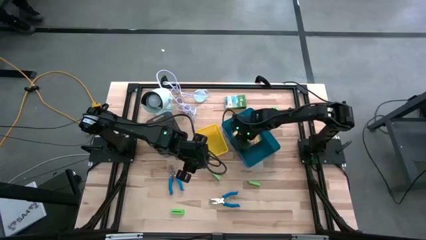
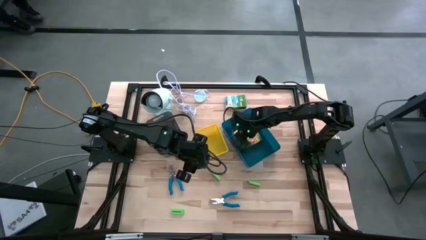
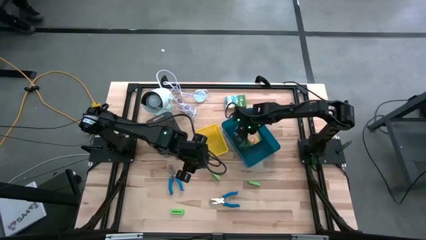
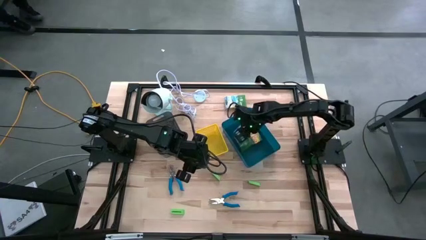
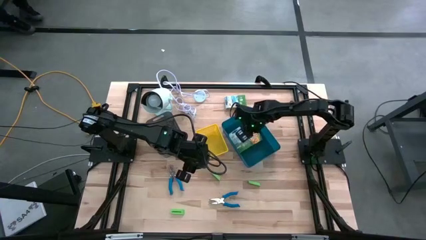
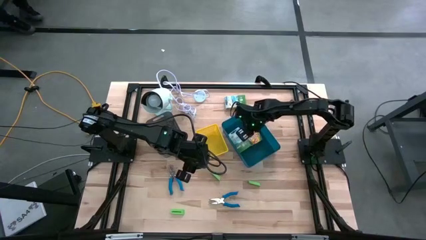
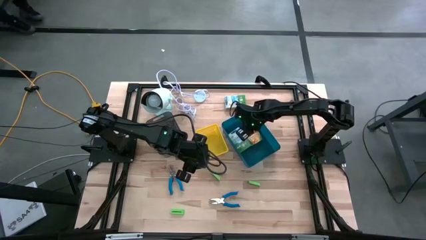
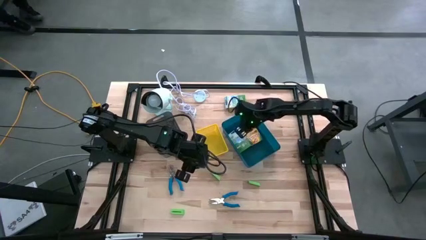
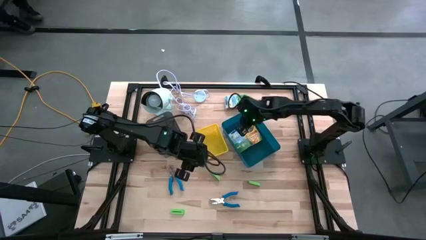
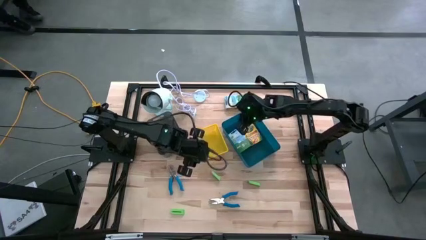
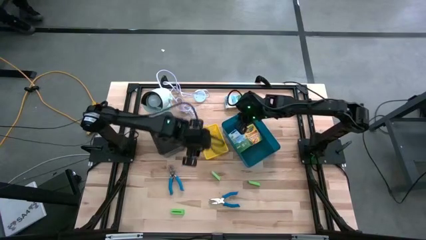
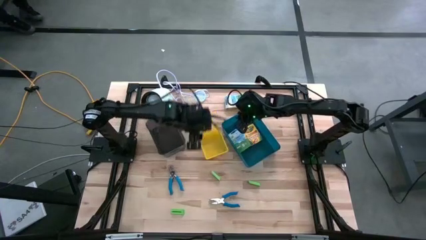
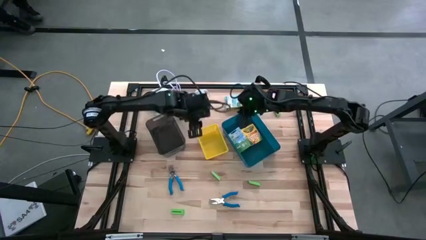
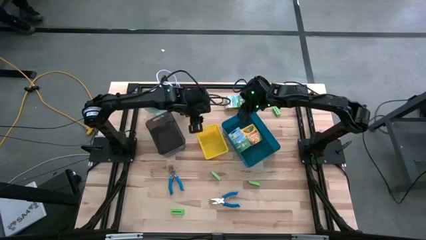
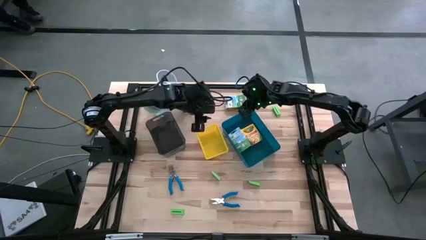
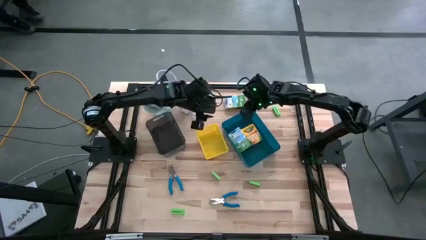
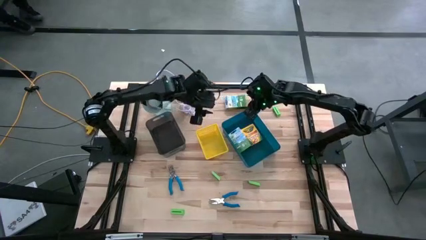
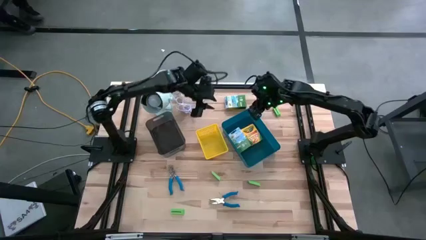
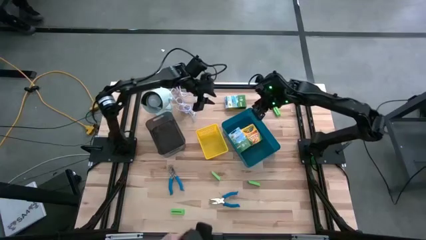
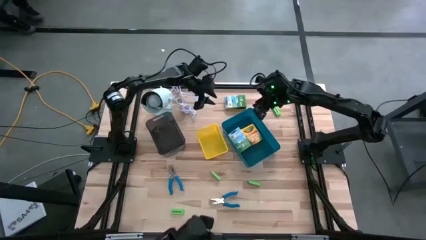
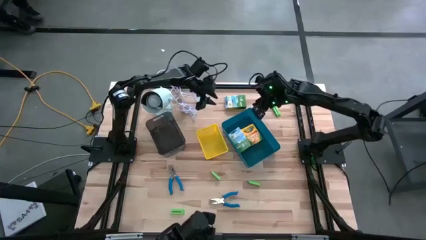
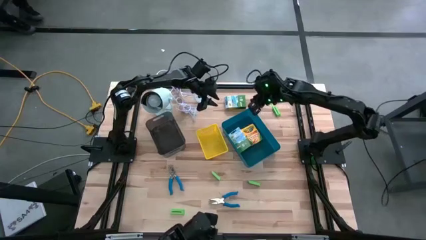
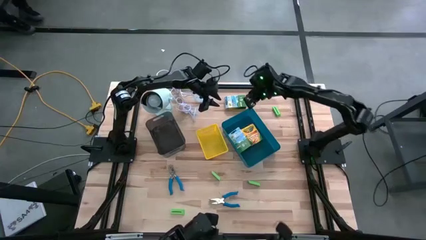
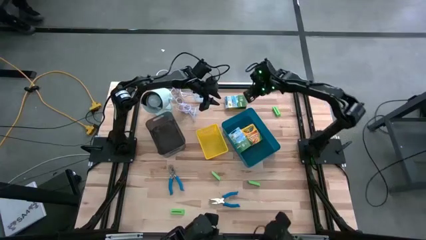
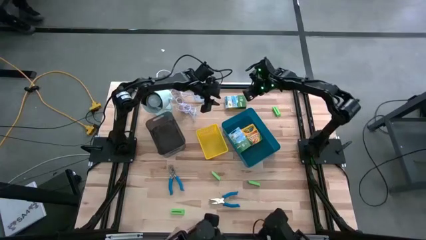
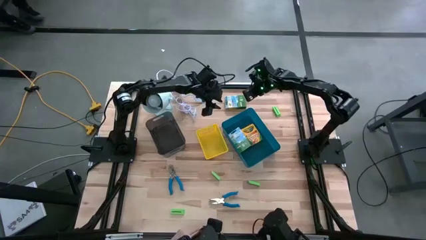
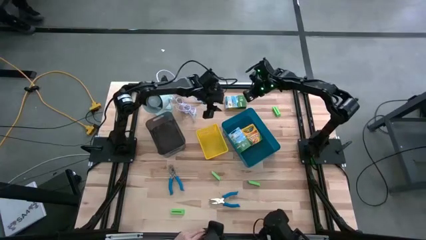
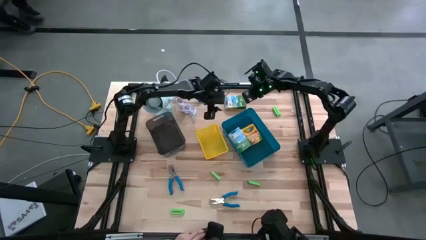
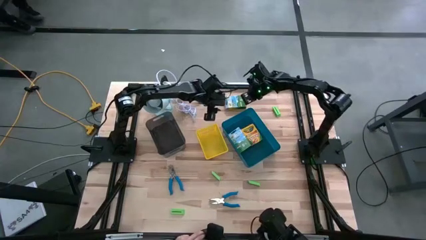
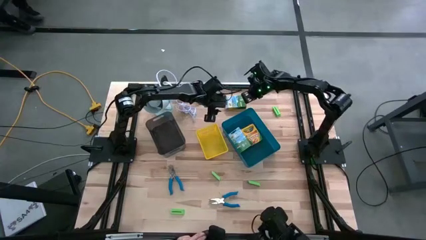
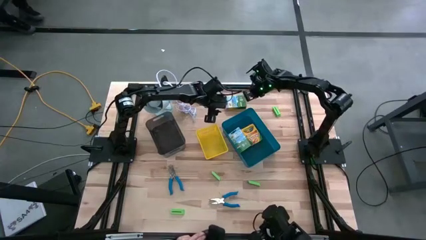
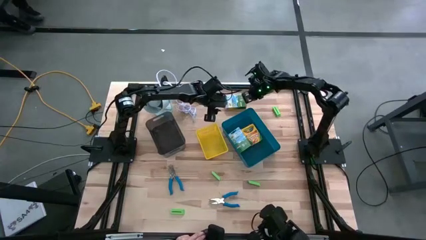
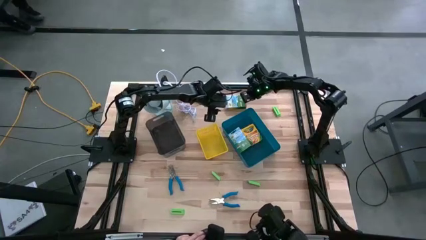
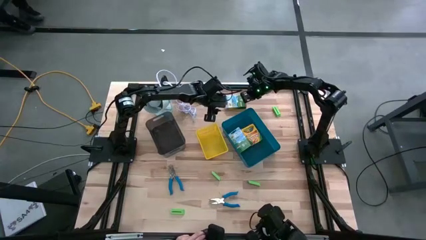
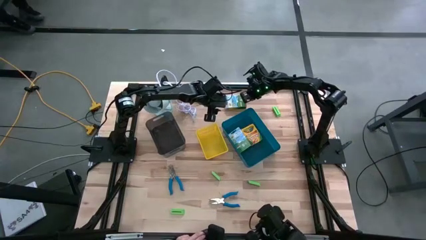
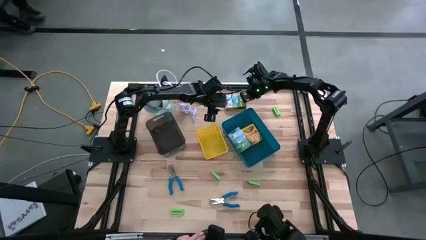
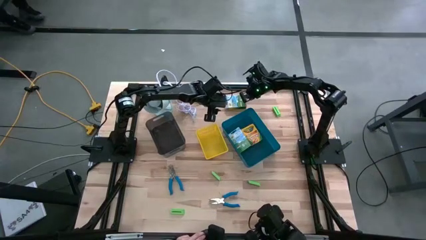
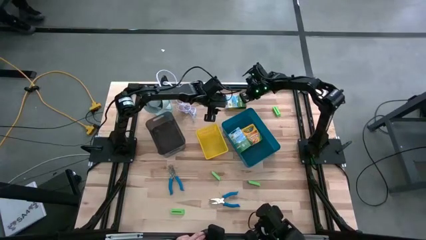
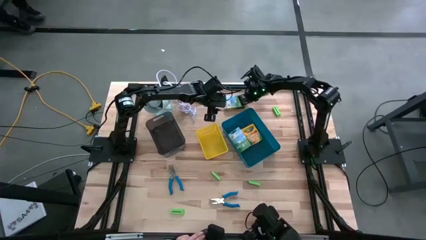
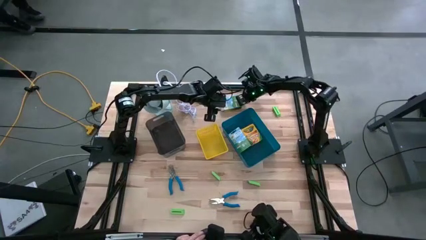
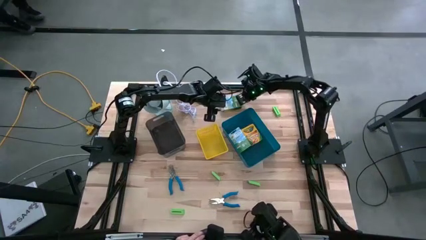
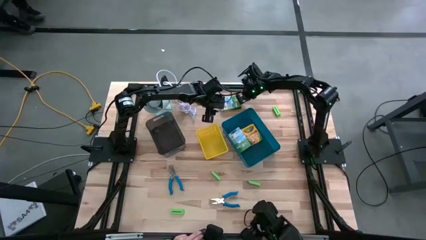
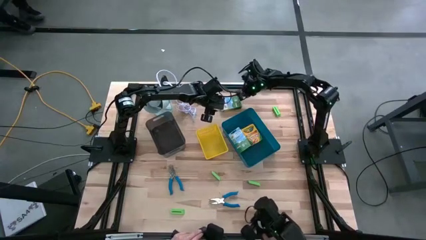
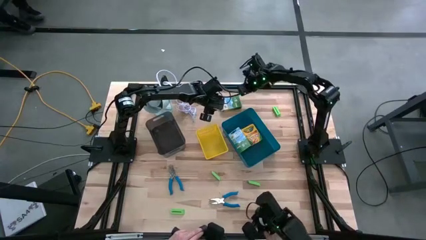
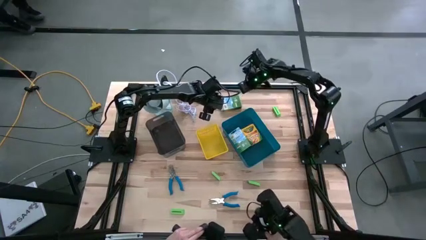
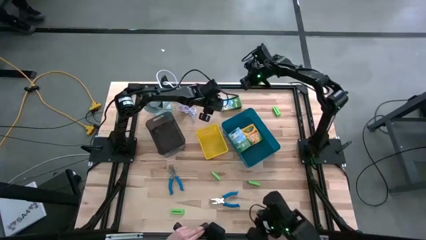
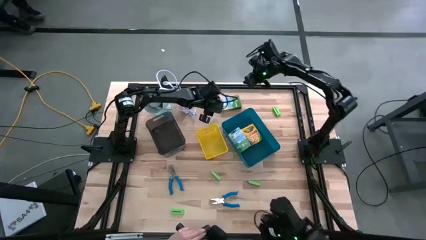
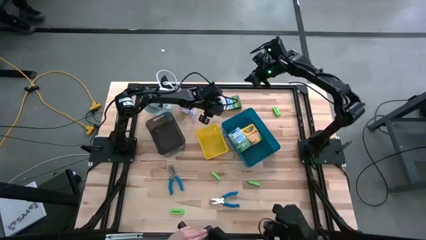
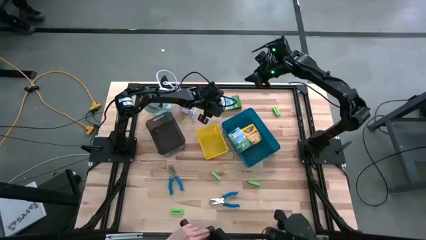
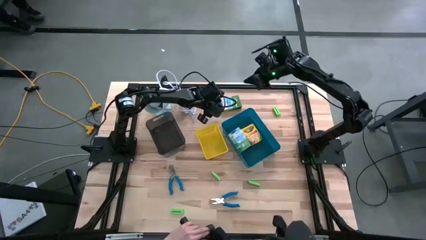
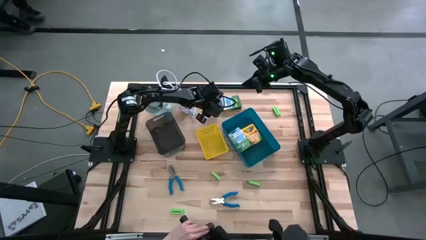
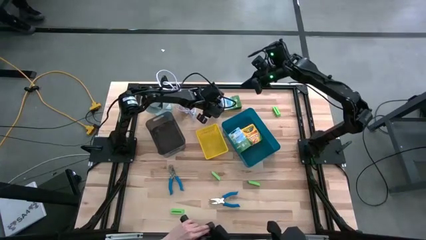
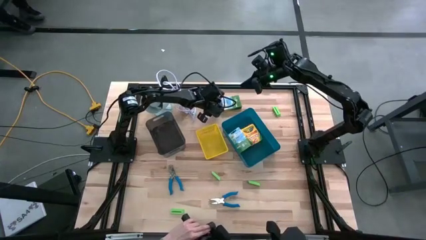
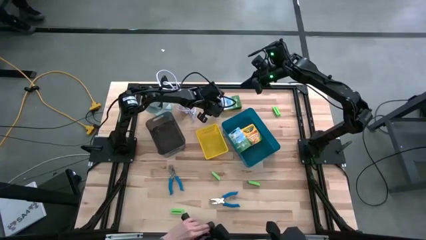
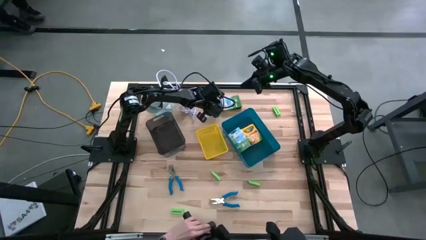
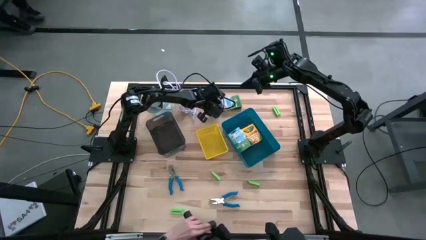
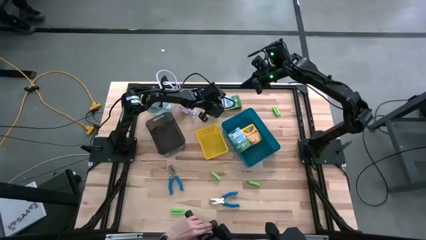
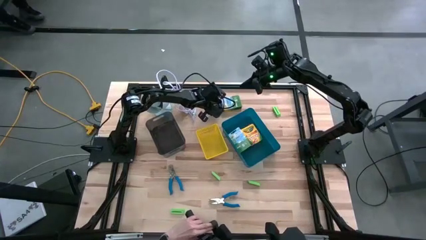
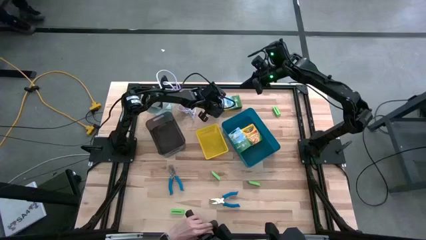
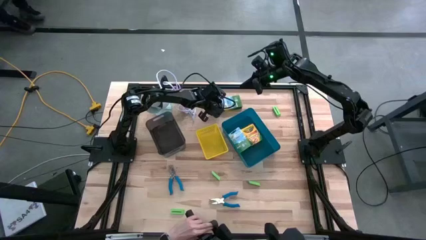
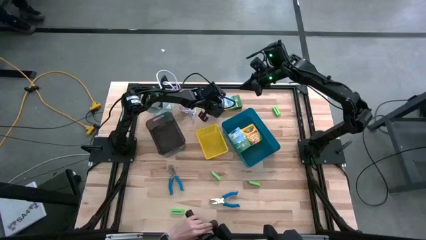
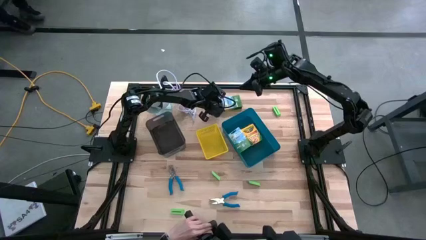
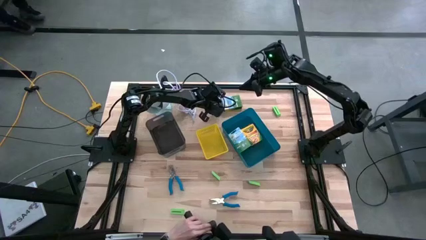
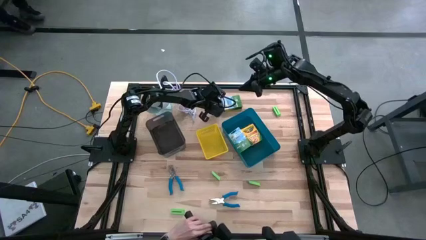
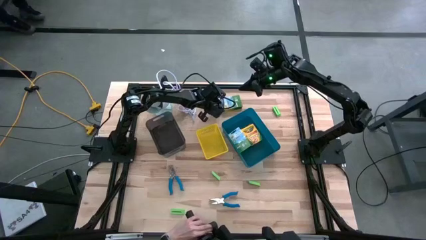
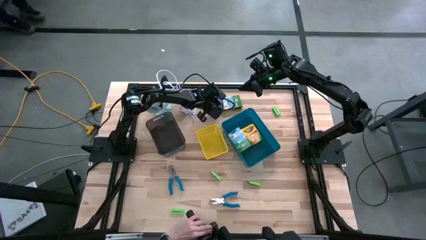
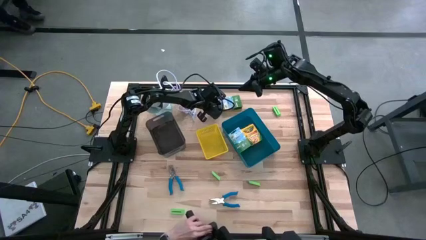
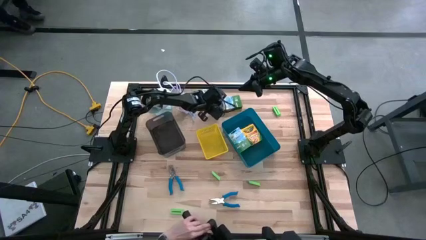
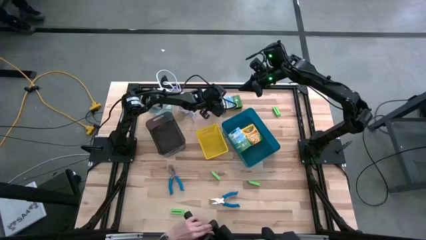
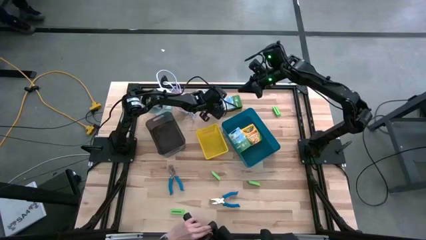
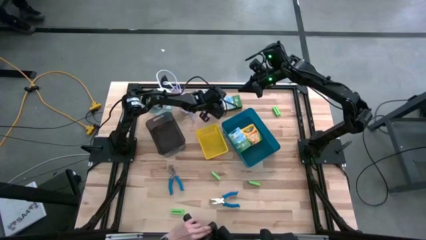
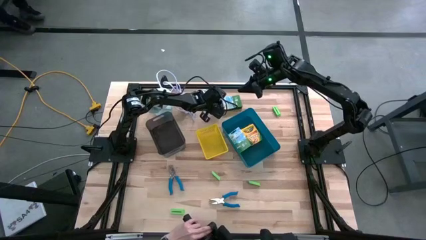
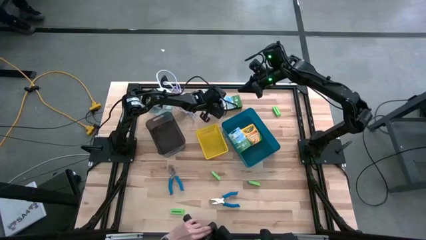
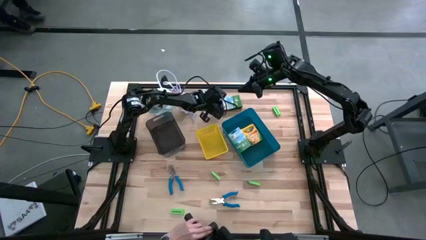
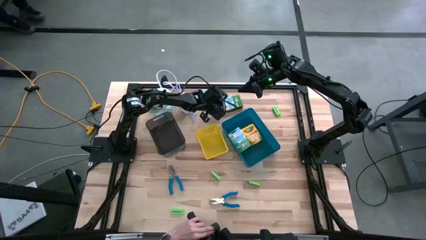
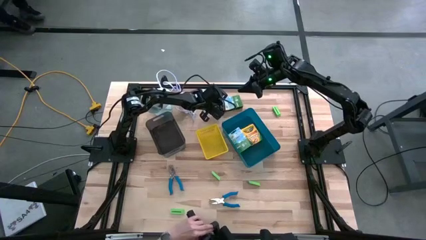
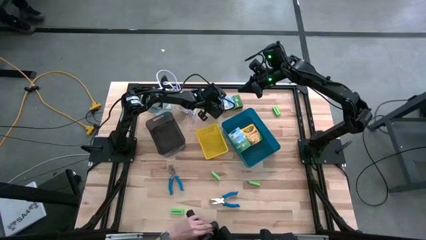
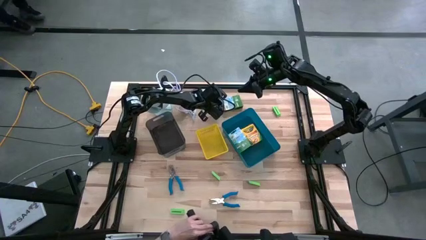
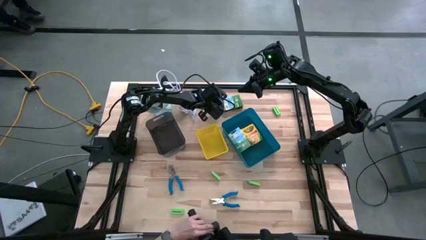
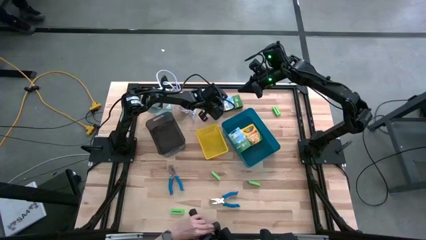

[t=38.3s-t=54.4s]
Task: Pick & Place School Supplies
Put the crayons box into the blue bin
